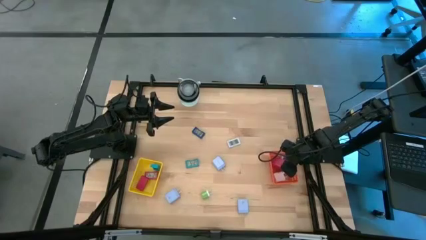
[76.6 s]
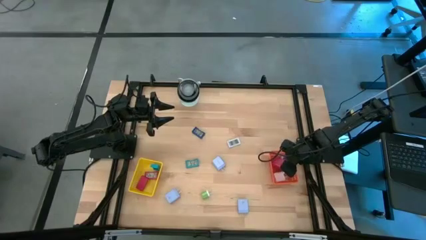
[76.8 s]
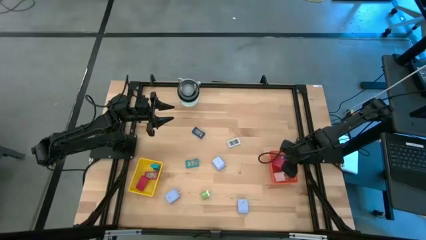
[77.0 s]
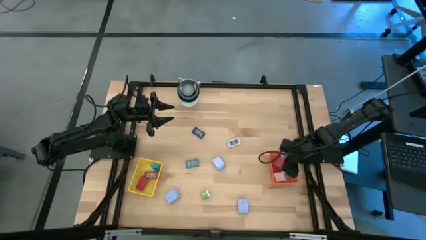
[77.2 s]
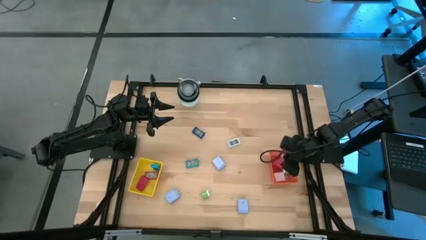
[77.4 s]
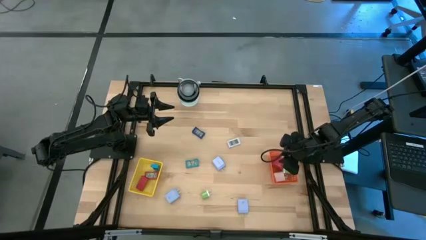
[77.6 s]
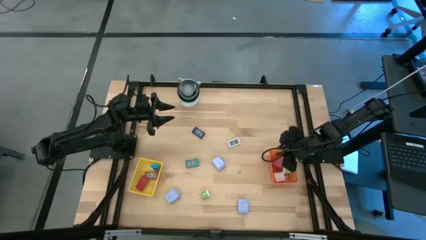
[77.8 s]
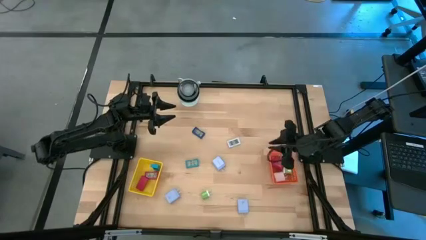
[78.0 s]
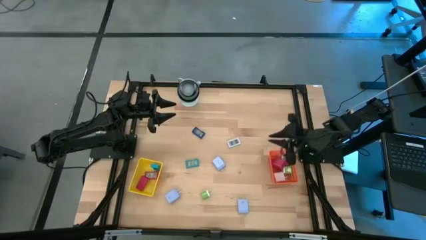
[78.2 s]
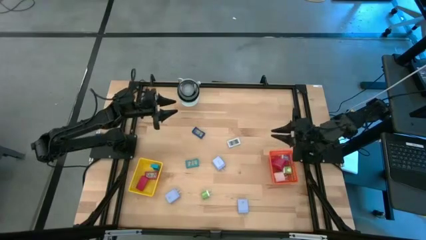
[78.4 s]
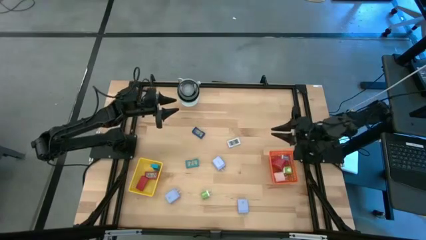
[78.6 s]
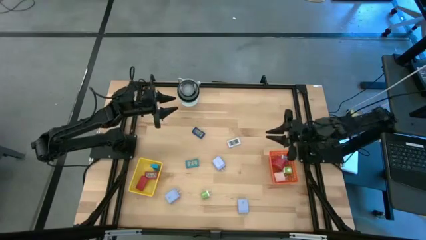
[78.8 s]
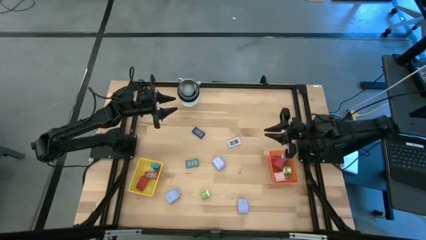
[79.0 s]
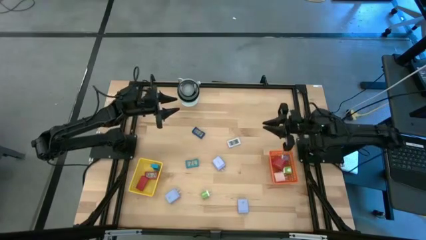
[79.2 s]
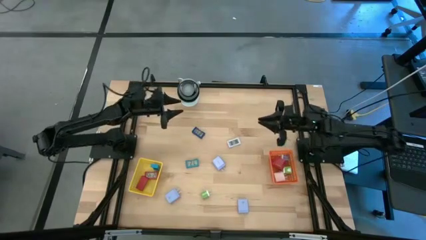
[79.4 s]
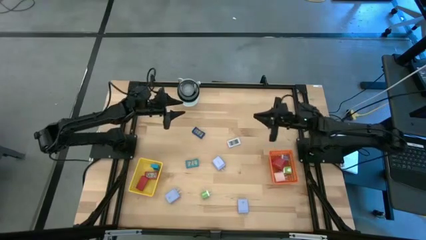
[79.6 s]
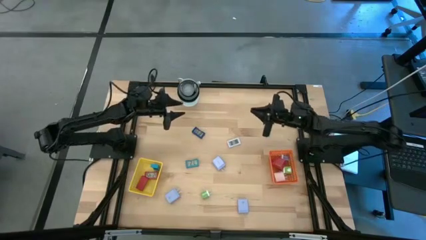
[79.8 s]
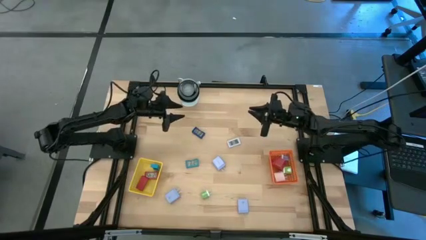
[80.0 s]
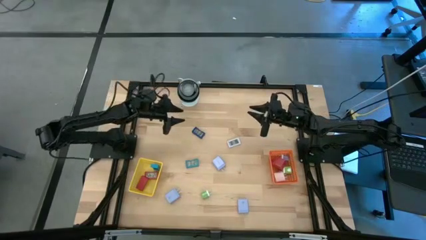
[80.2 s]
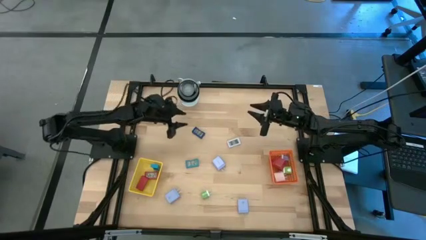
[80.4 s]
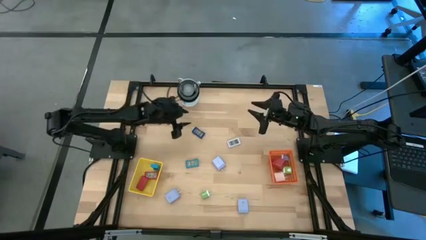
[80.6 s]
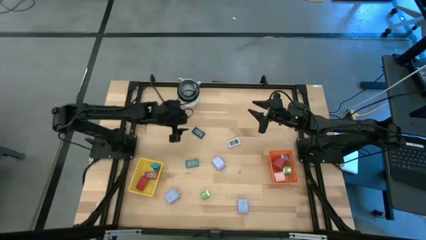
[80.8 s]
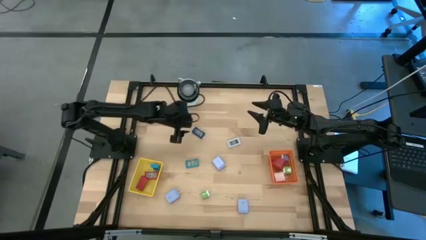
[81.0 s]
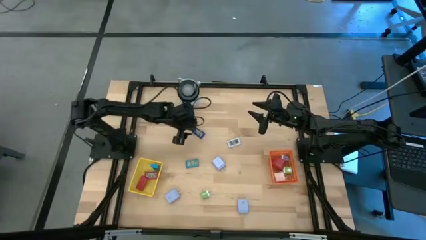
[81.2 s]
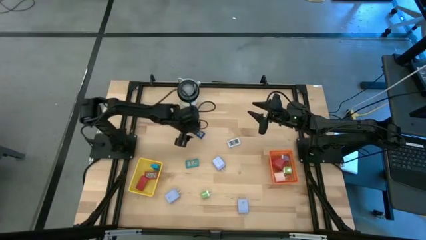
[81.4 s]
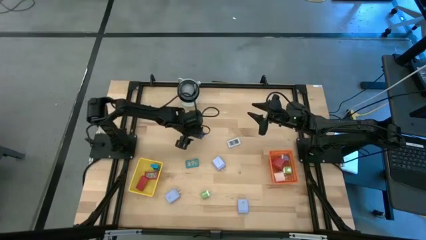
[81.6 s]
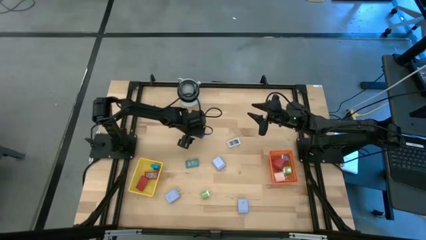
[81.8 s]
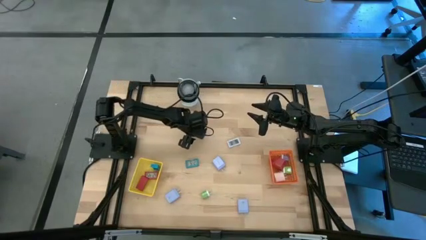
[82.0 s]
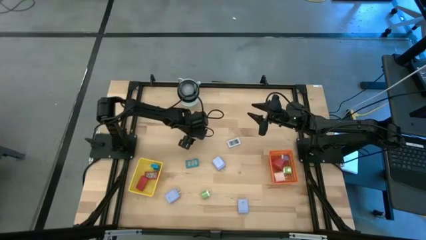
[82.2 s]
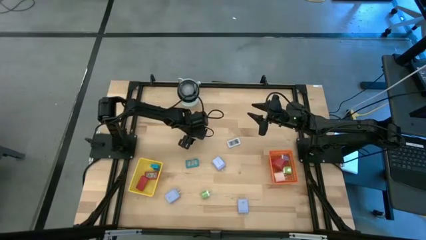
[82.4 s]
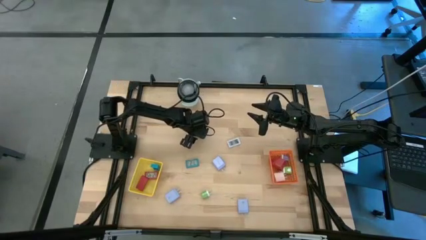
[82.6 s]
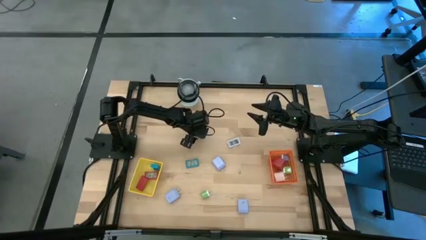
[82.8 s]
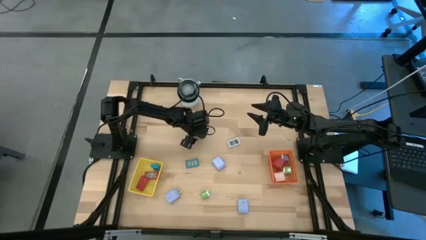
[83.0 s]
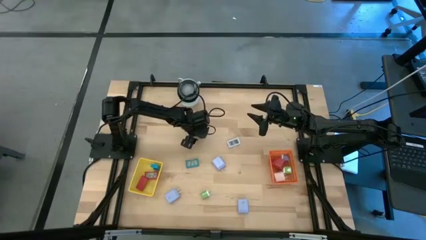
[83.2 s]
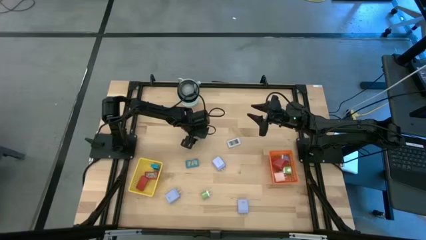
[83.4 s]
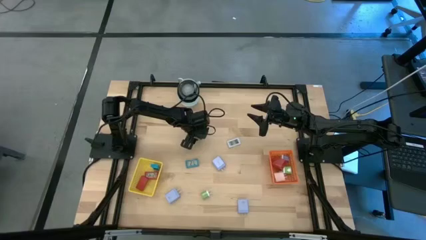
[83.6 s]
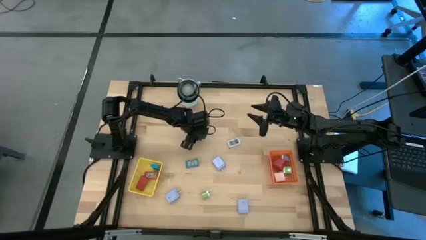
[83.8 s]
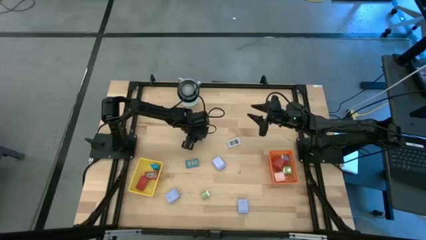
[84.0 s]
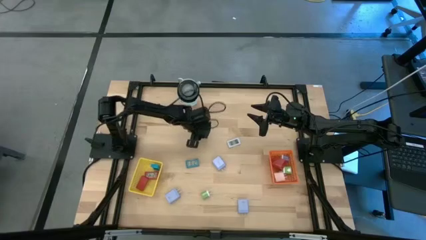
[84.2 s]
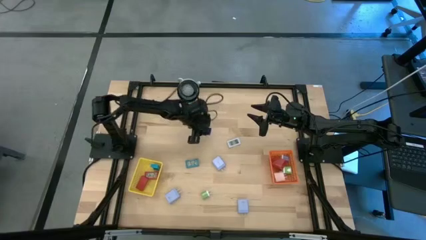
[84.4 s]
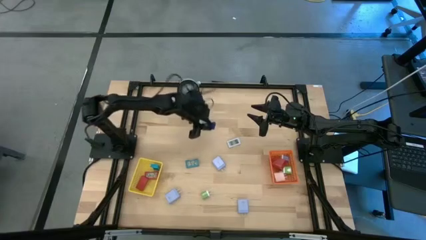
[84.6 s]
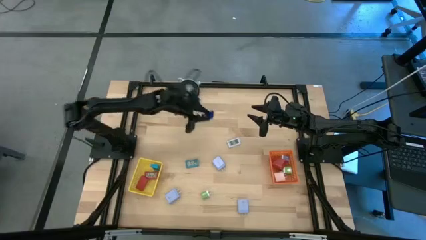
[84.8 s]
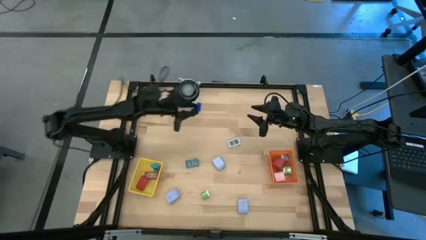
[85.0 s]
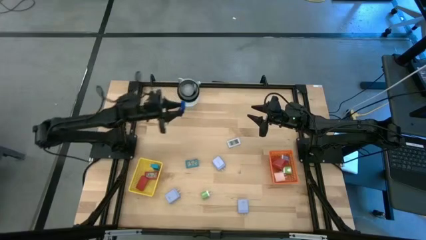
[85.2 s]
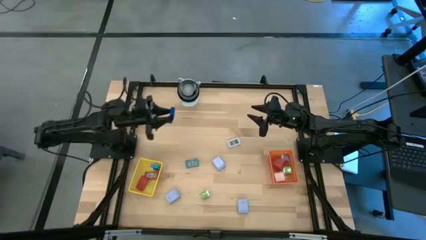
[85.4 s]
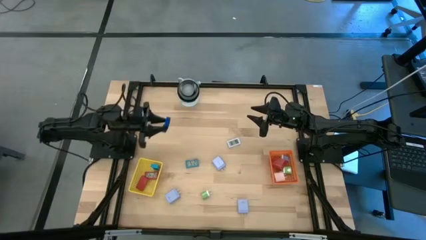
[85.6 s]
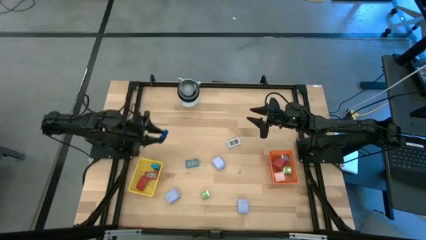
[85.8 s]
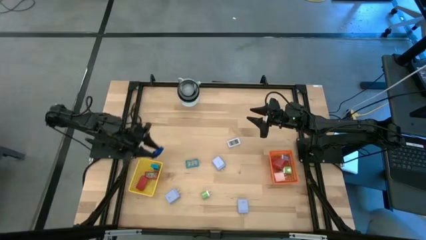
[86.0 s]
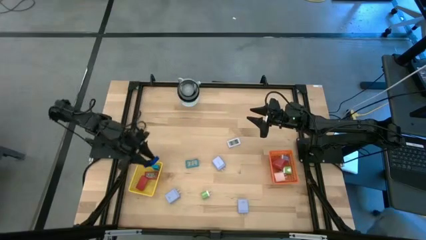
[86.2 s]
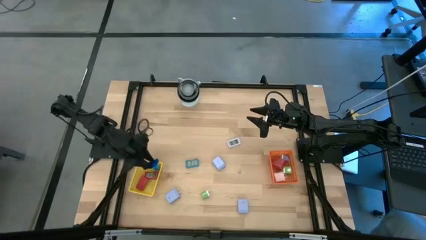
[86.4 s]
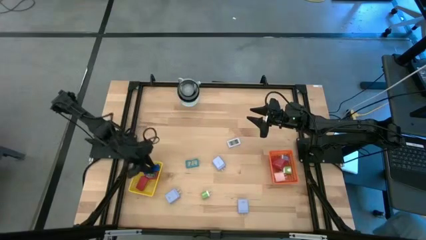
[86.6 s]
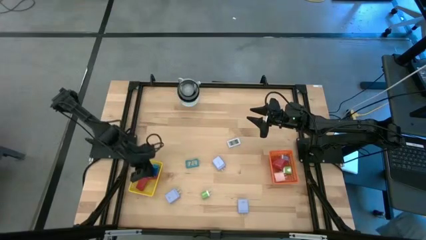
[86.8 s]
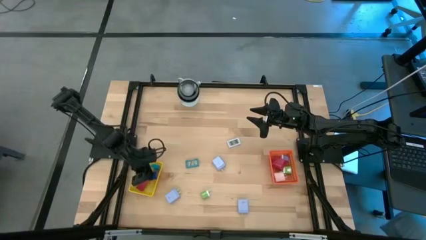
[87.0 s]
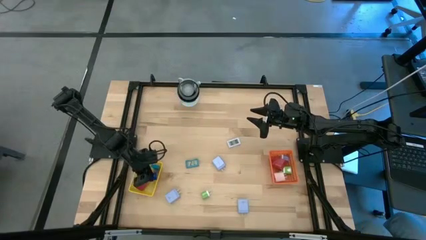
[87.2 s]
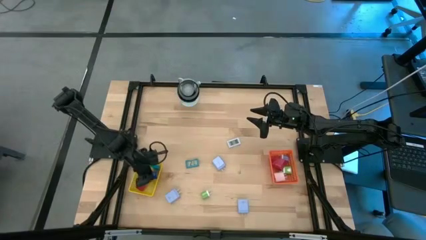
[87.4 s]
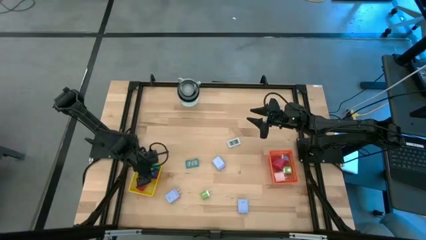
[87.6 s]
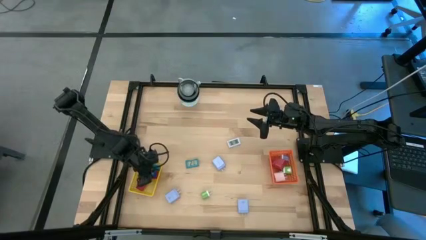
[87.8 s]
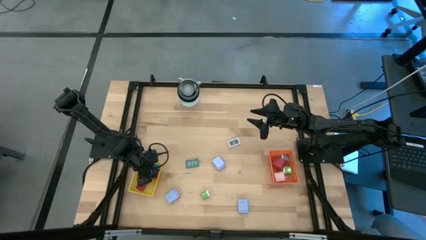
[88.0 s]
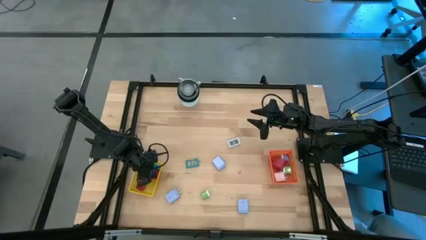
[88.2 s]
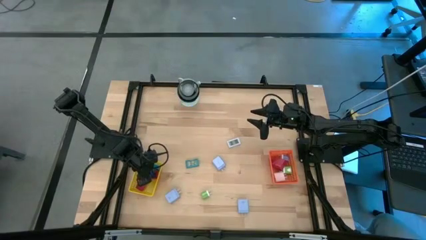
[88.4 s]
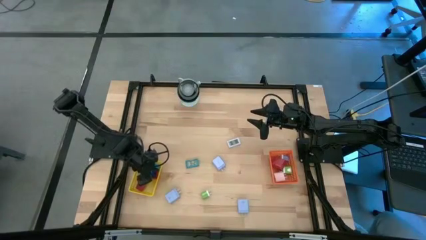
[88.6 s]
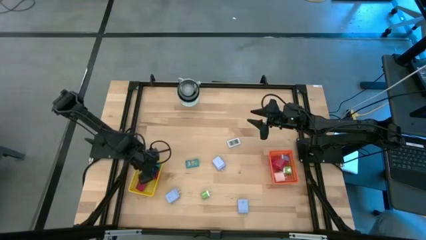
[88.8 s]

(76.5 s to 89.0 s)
Task: Pick & Place Office items
Put the blue digital timer into the yellow basket

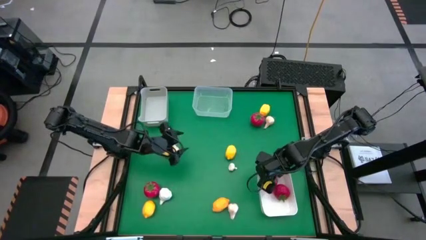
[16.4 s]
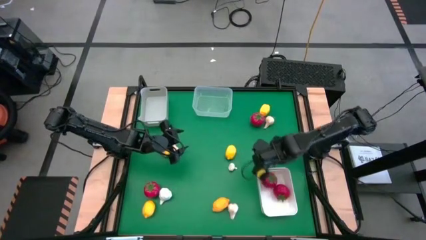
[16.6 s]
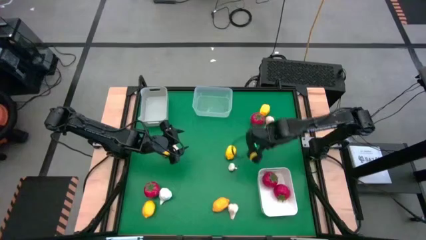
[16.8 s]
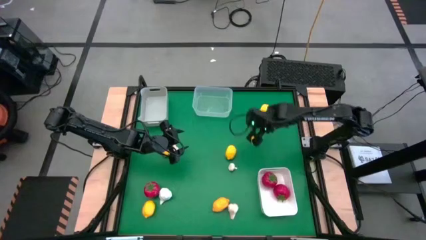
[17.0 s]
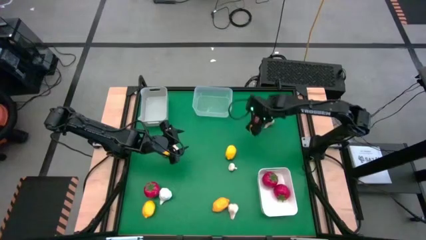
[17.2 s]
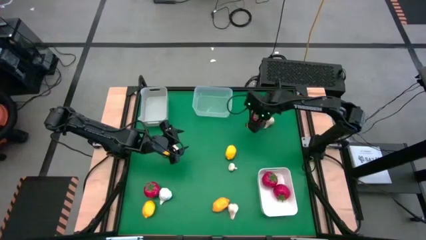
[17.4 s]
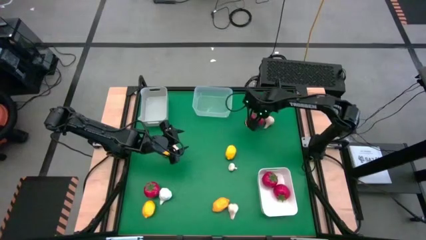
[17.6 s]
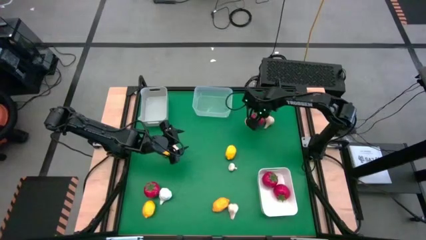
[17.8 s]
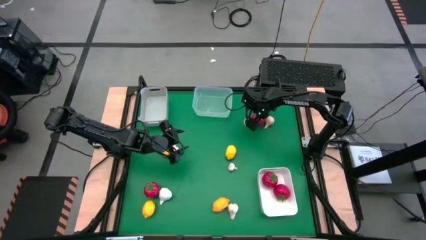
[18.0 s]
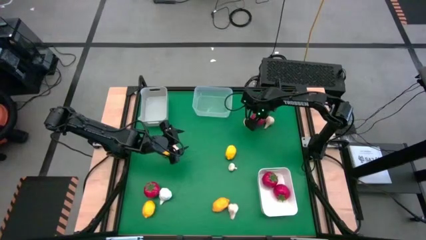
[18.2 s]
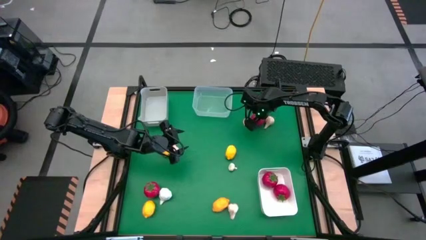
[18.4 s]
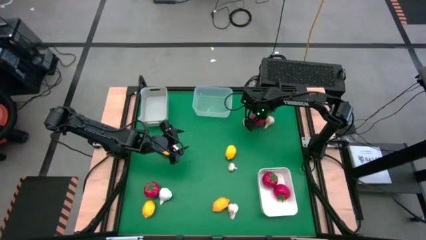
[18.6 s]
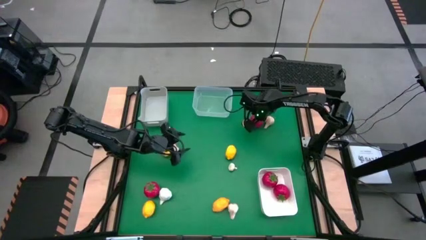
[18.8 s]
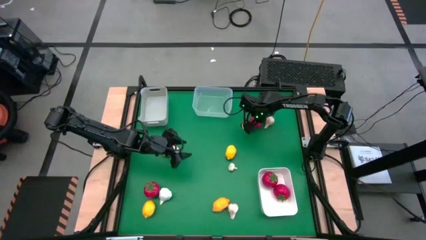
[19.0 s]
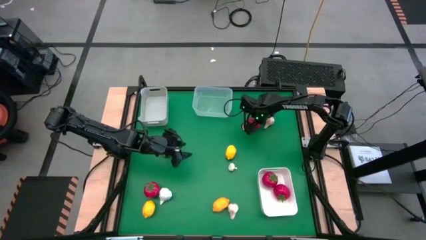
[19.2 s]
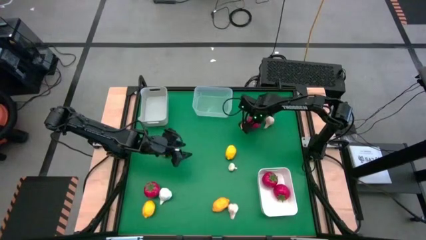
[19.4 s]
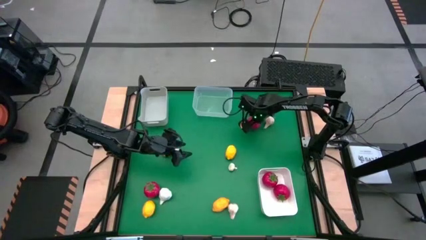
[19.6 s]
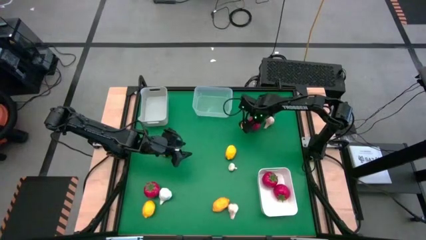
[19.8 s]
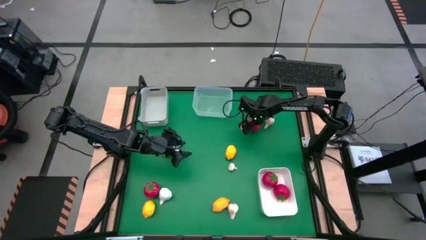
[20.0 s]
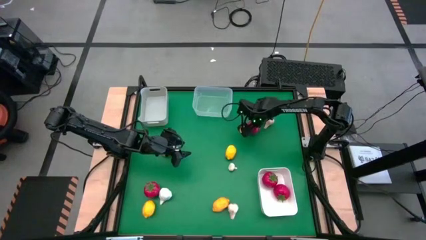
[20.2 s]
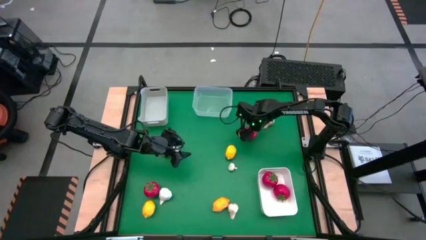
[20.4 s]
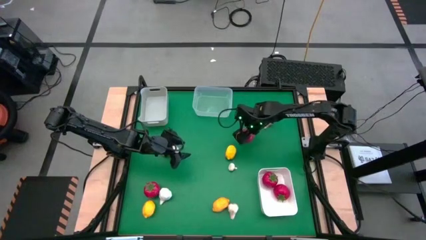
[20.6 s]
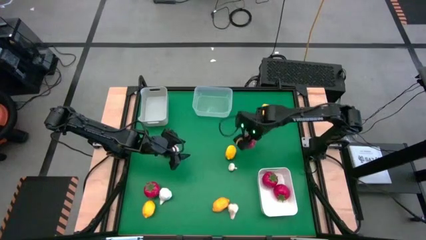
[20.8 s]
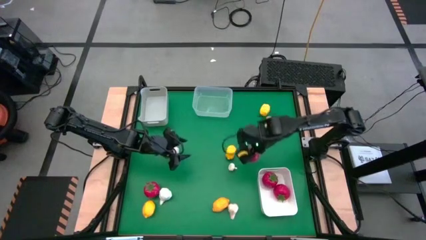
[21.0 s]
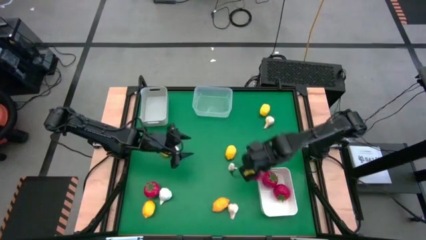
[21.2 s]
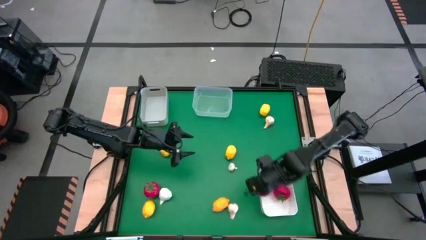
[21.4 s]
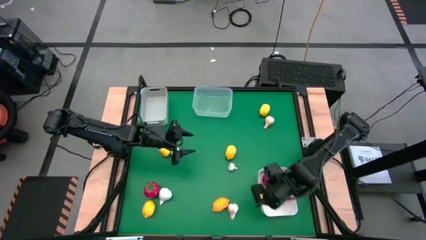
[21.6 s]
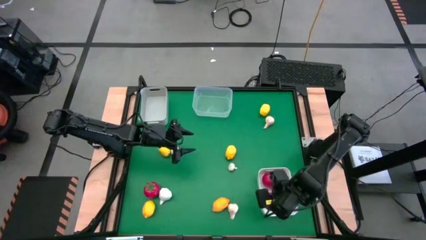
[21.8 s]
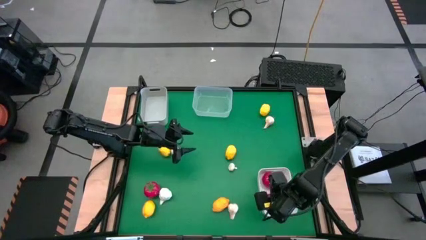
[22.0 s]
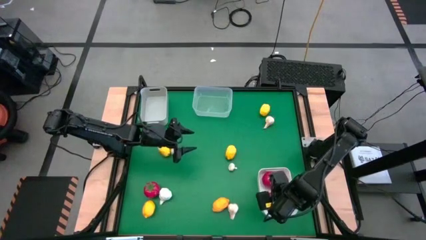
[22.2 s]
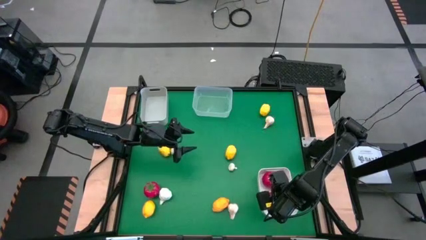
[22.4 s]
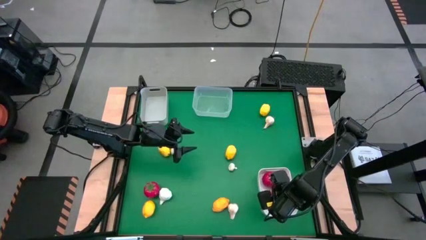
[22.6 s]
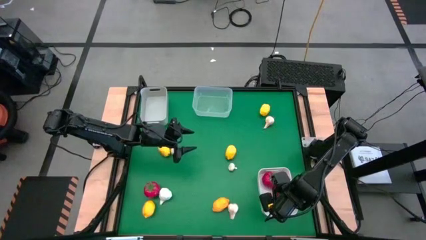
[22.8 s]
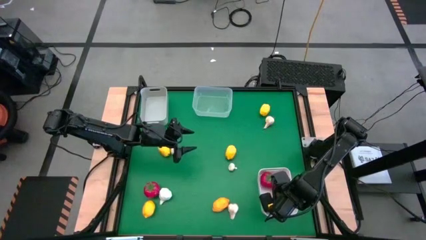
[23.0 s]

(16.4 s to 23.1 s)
Task: Sort produce into baskets
Put the red tomato into the white bin
